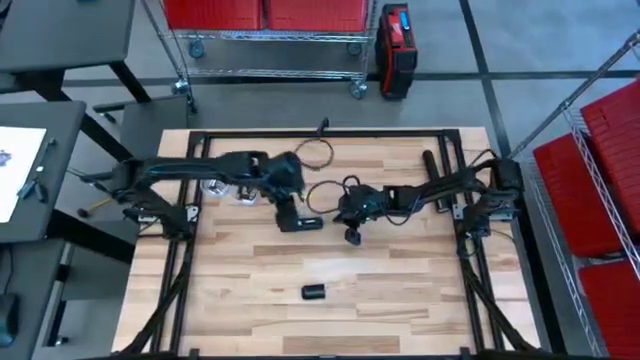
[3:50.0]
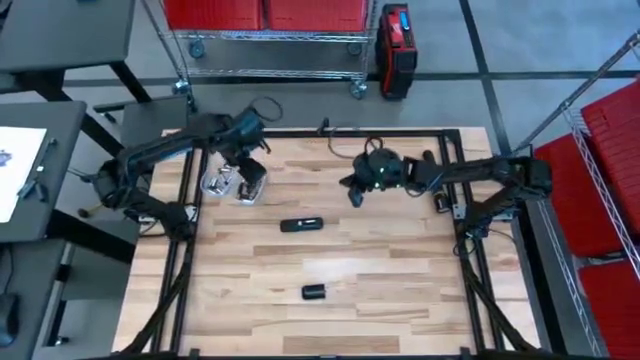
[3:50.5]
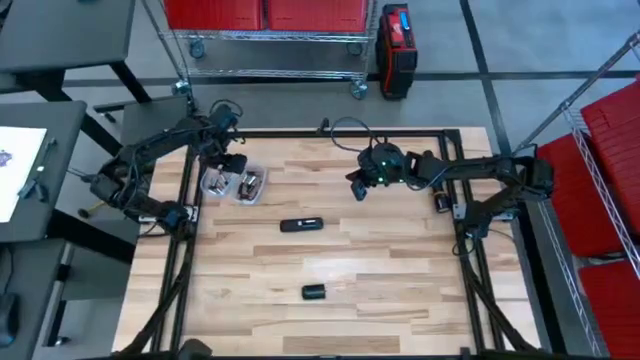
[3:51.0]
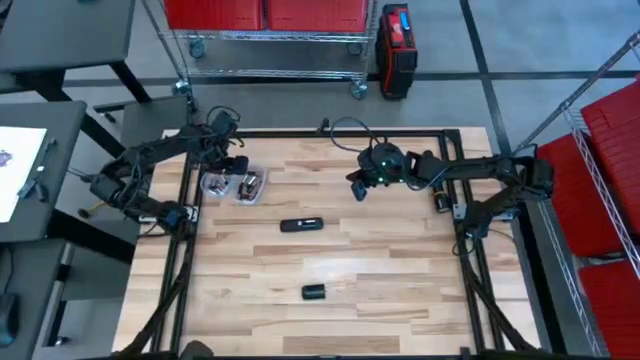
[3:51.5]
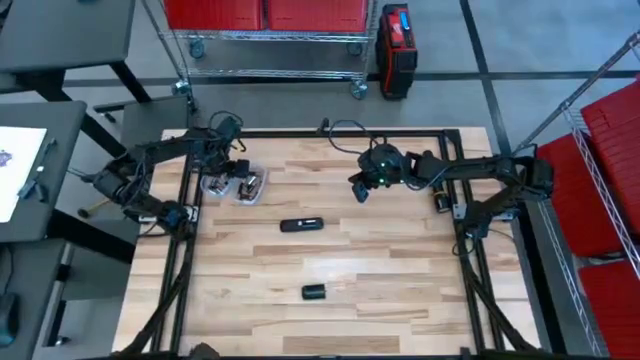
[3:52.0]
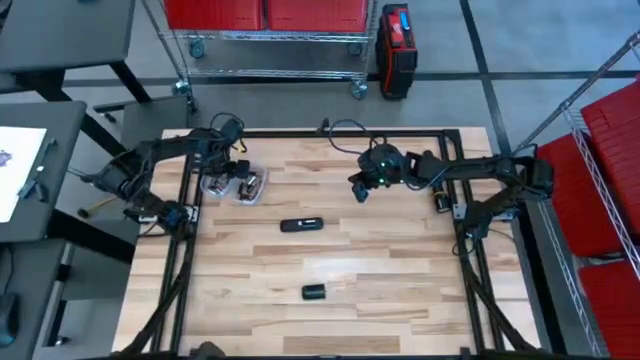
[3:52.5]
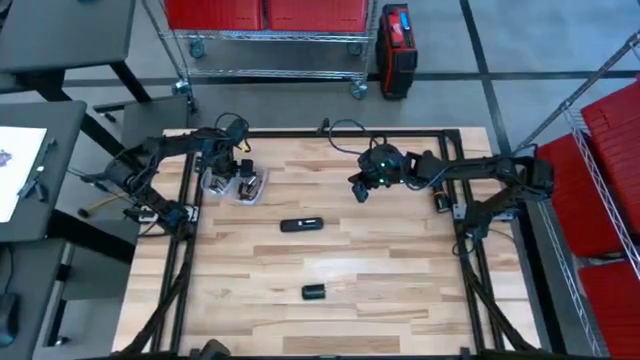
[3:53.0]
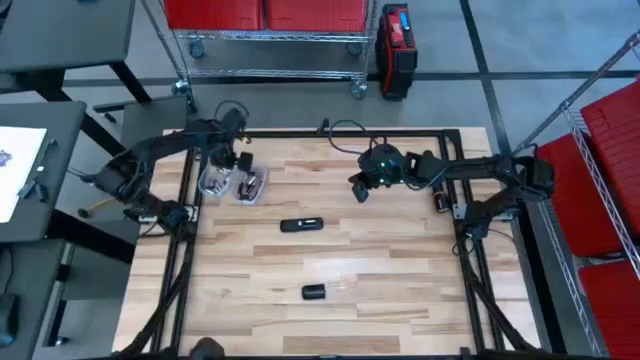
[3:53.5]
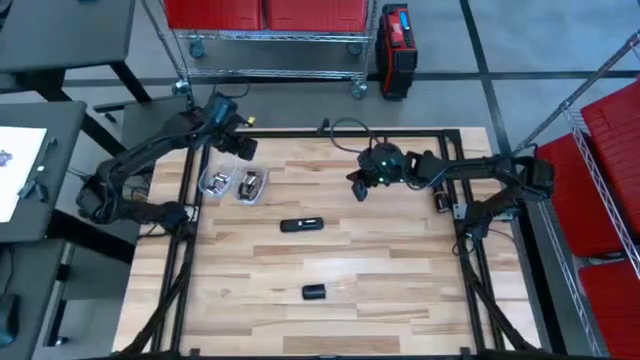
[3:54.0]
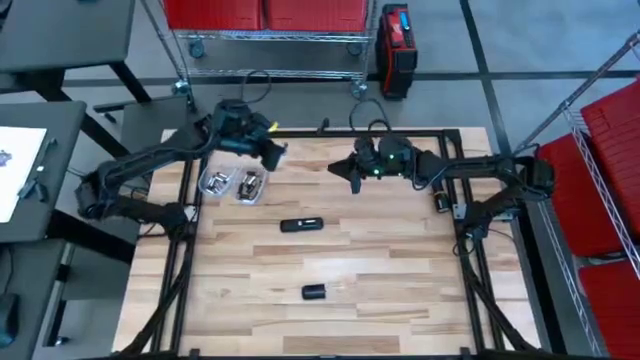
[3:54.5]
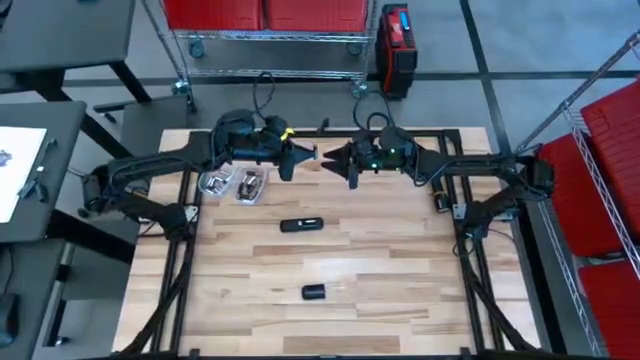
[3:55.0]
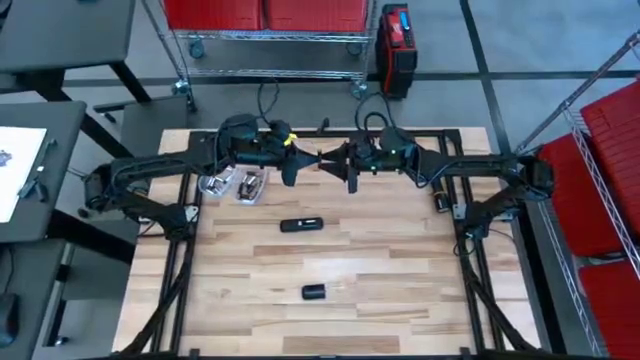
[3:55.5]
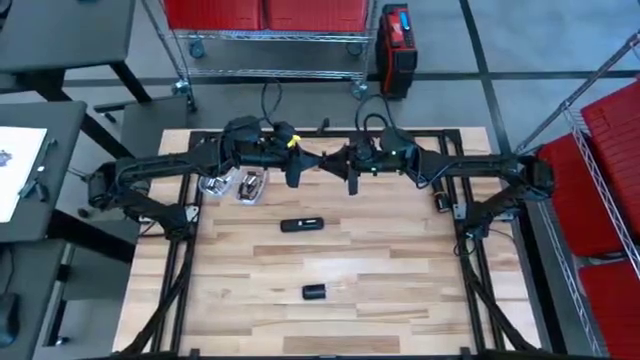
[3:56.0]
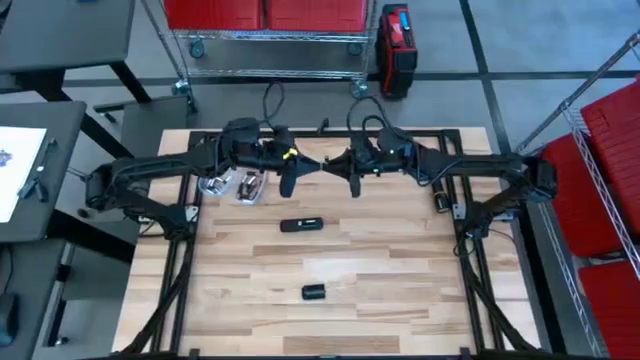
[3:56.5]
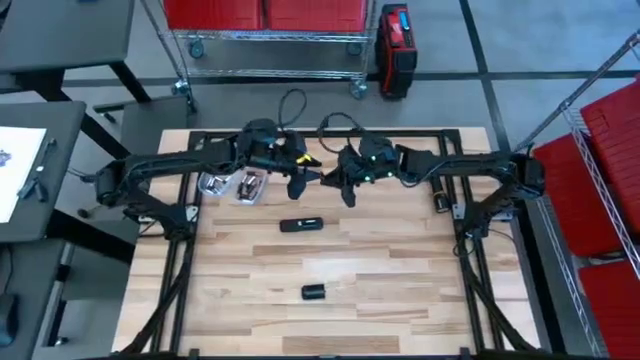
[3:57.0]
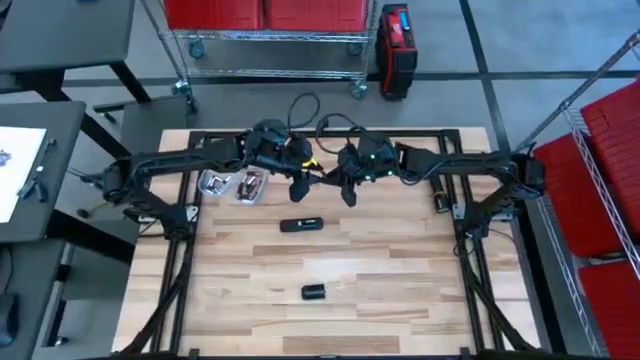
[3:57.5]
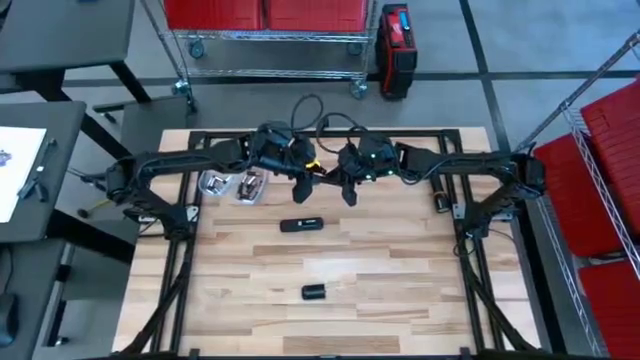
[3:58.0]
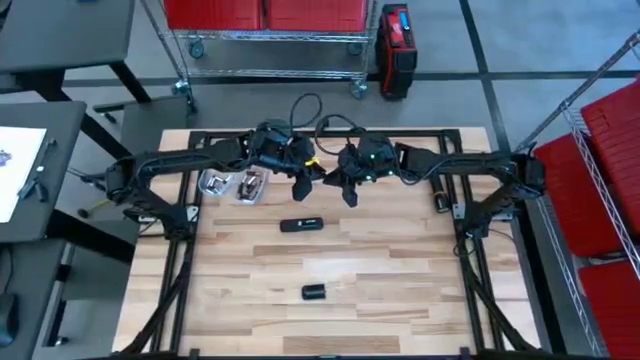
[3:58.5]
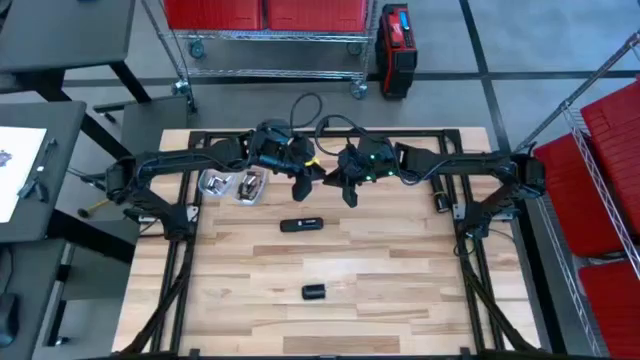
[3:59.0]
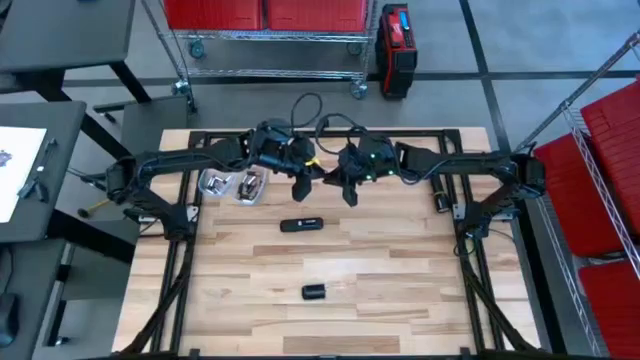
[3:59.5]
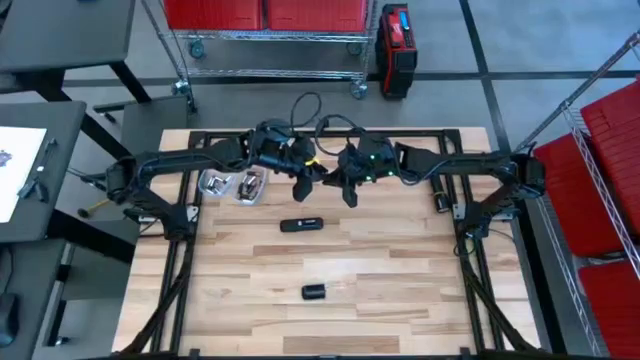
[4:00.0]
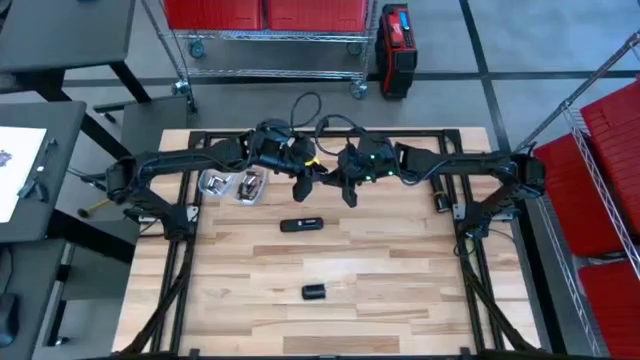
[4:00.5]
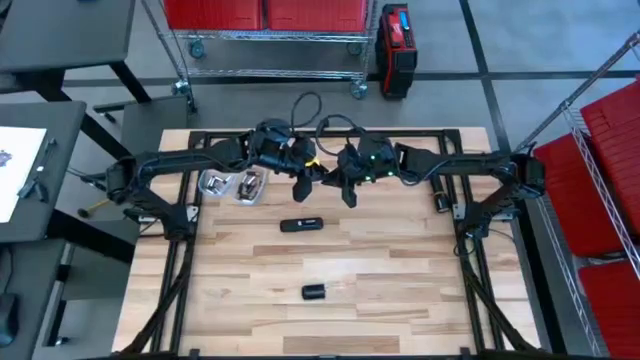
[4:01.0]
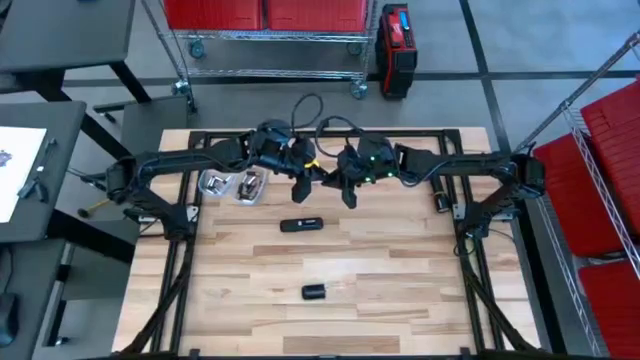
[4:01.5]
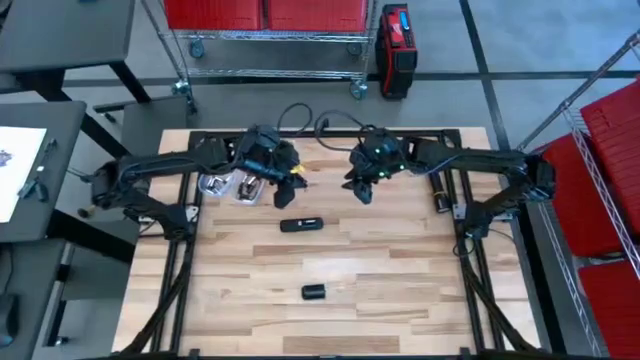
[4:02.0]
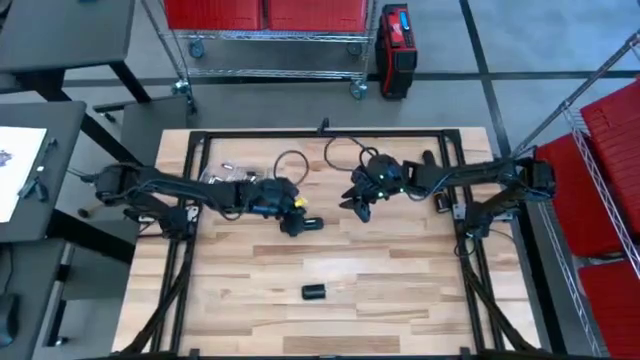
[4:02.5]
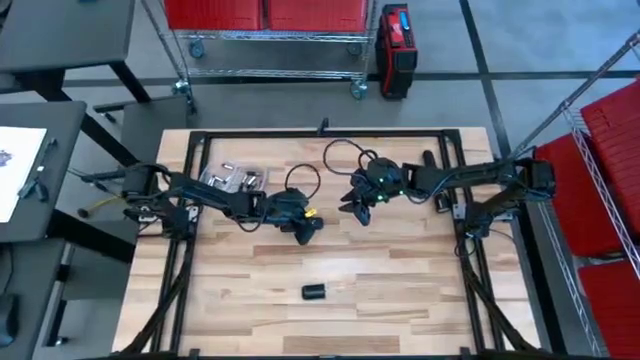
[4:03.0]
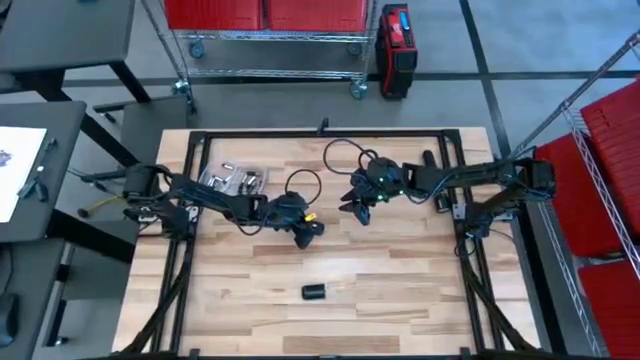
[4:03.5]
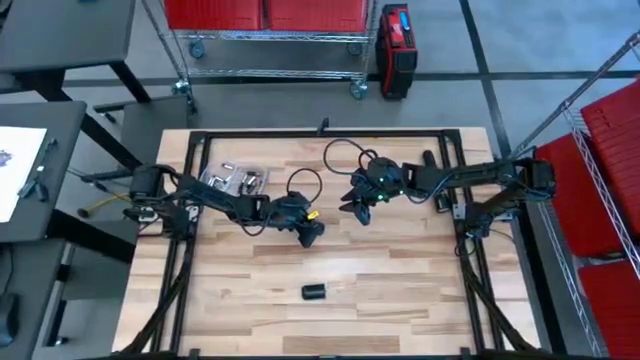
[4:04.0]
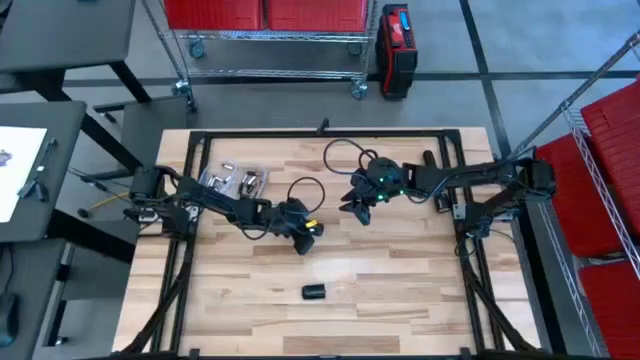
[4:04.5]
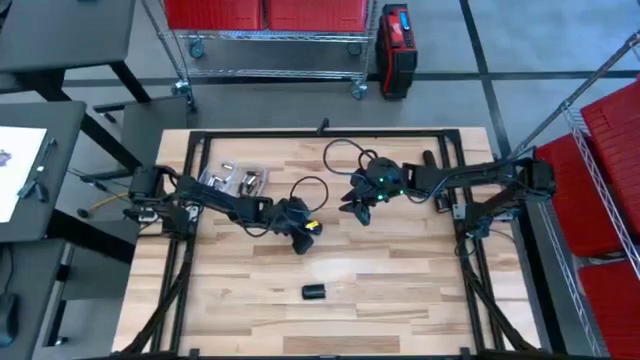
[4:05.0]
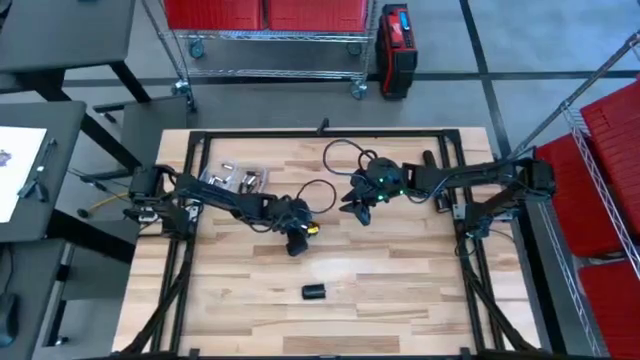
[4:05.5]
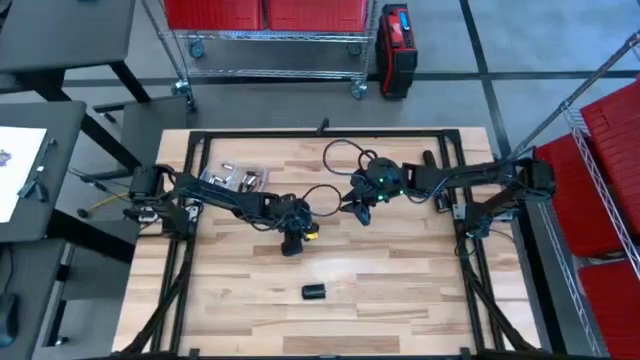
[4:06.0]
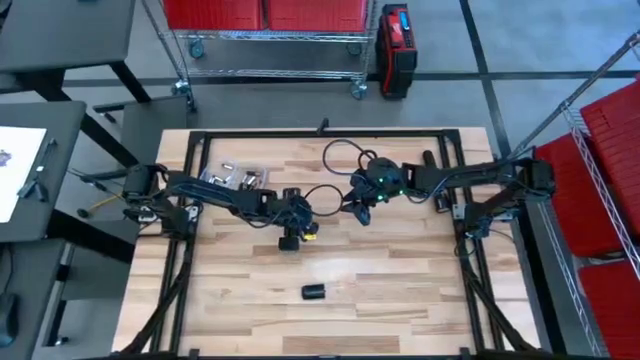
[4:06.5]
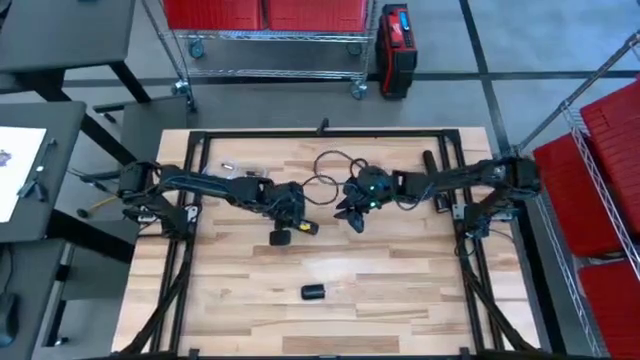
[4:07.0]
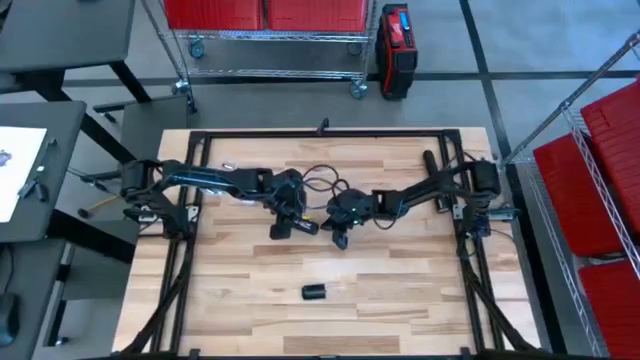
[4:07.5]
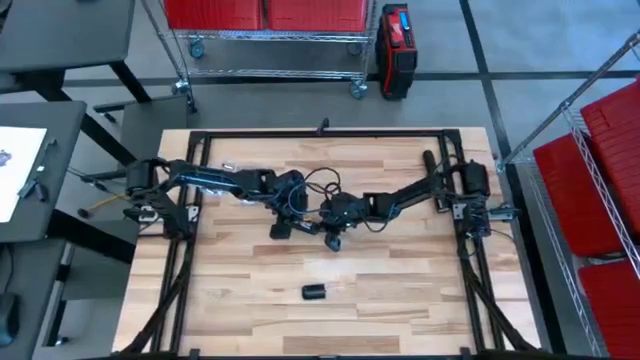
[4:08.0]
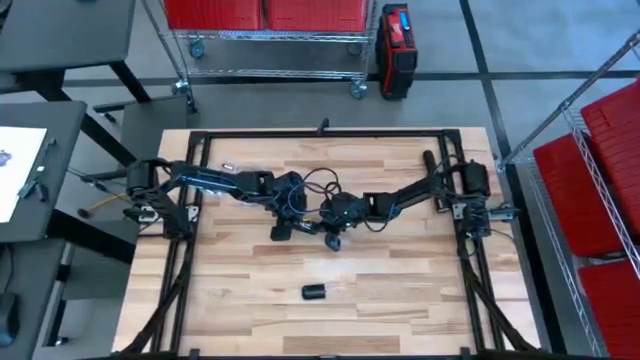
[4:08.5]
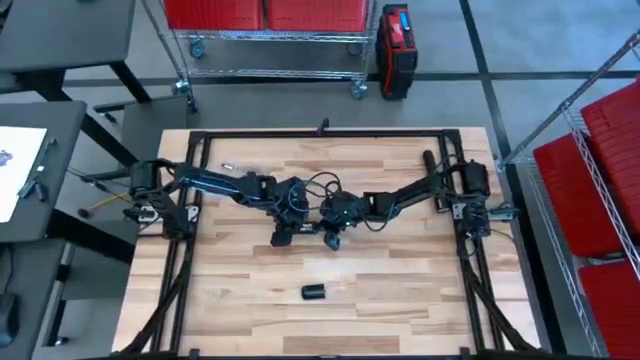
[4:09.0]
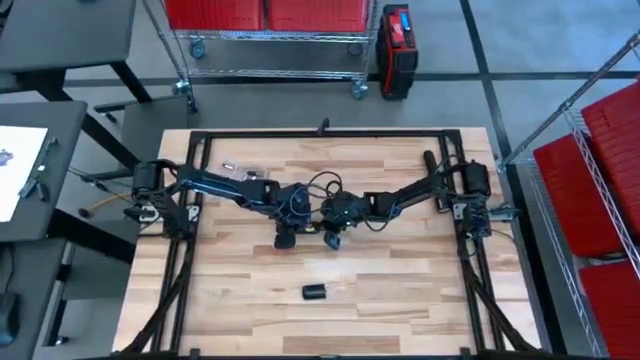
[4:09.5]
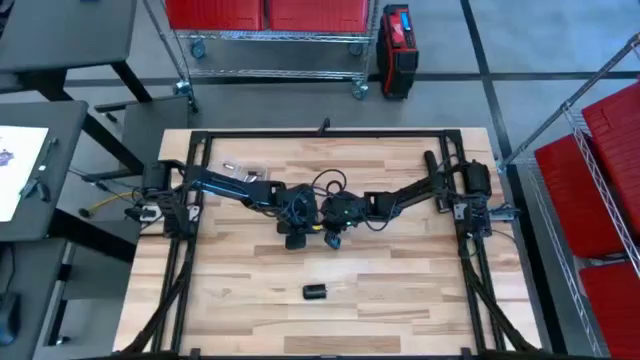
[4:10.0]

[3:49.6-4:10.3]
Task: Insert battery
Insert the silver battery into the remote's battery compartment

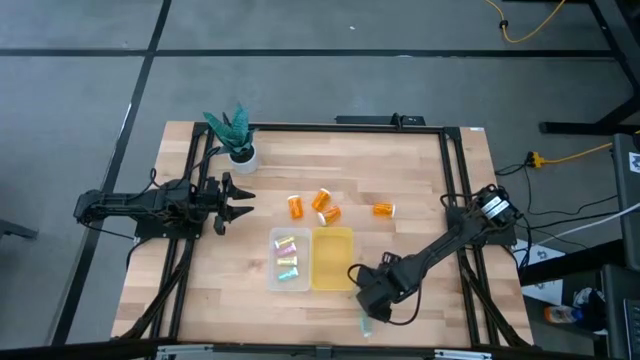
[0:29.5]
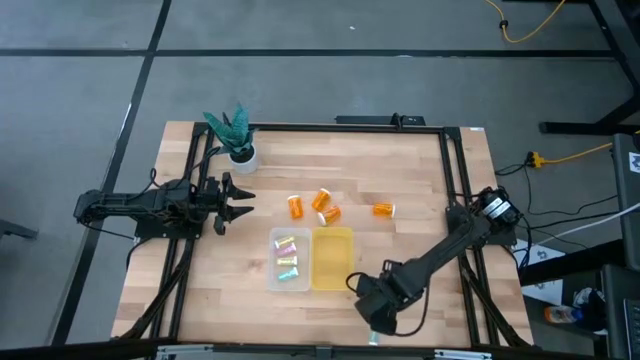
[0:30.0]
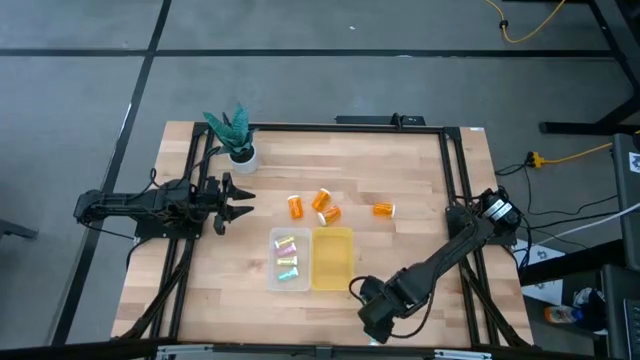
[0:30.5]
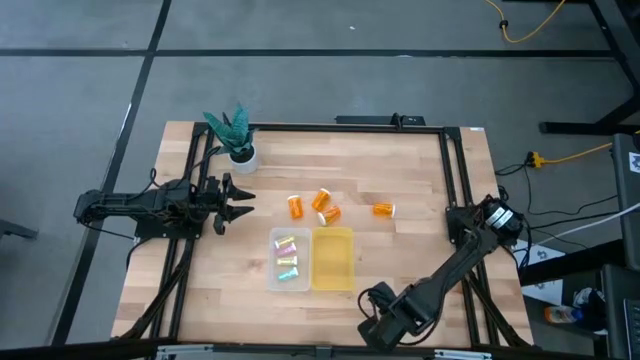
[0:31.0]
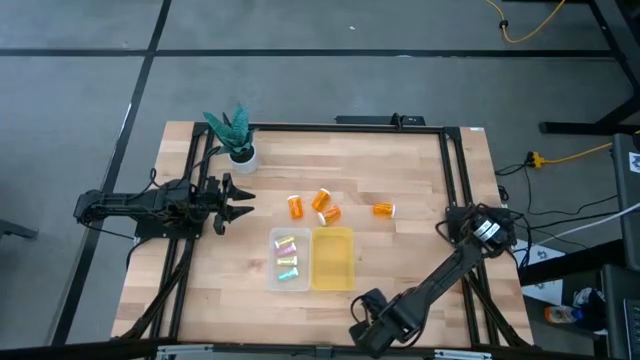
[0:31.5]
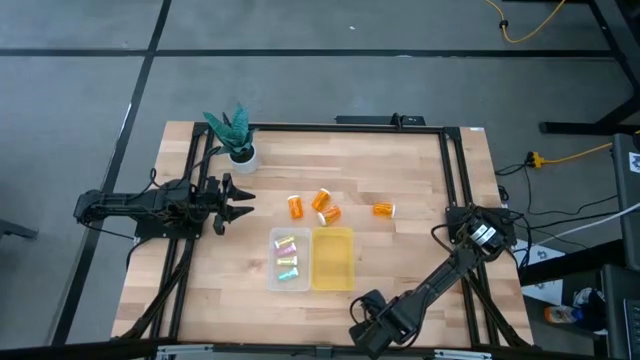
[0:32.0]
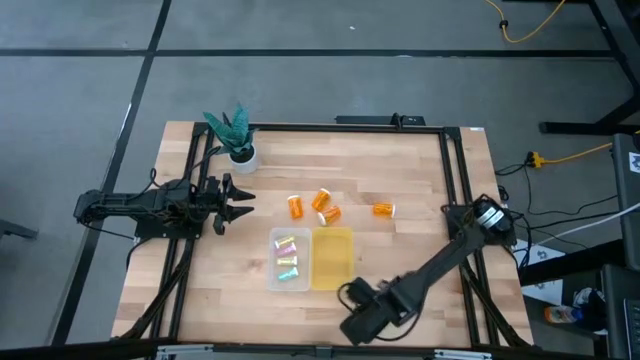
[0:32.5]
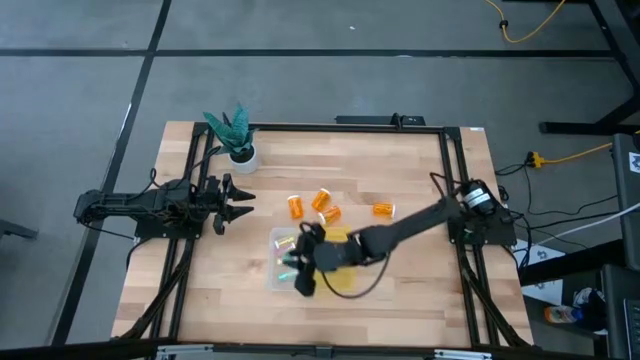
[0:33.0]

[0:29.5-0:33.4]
Task: Pick and place medicine bottles into bin by pill shape (circle, oval)
Put the blue tablet bottle into the transparent bin
